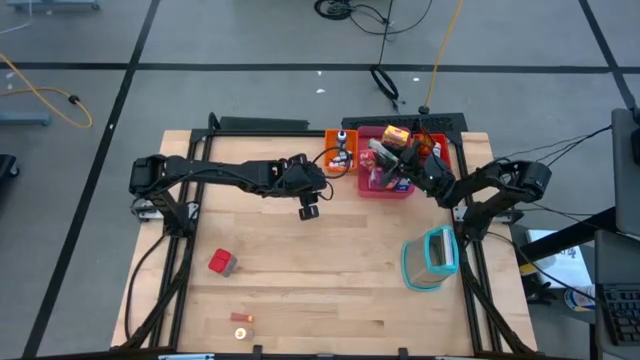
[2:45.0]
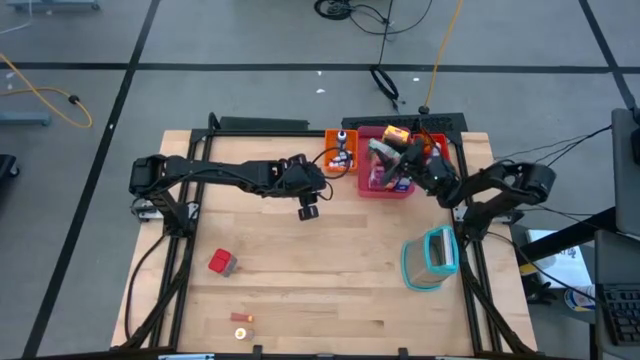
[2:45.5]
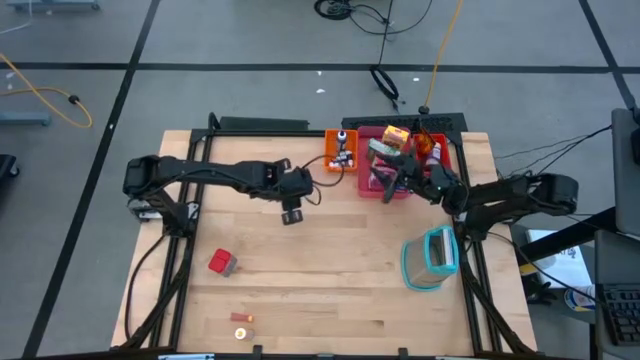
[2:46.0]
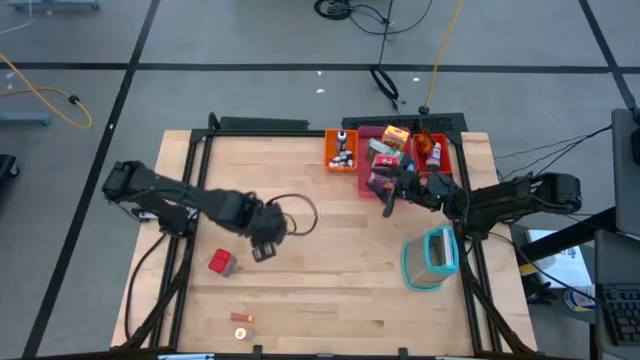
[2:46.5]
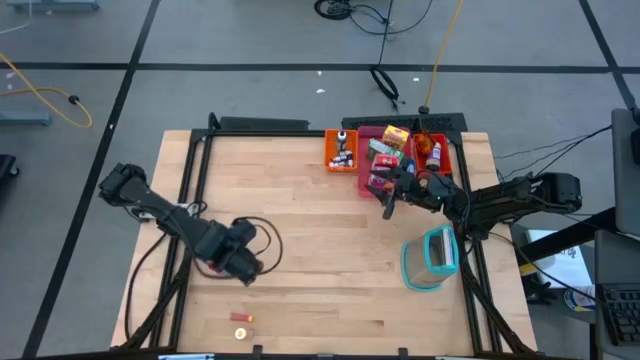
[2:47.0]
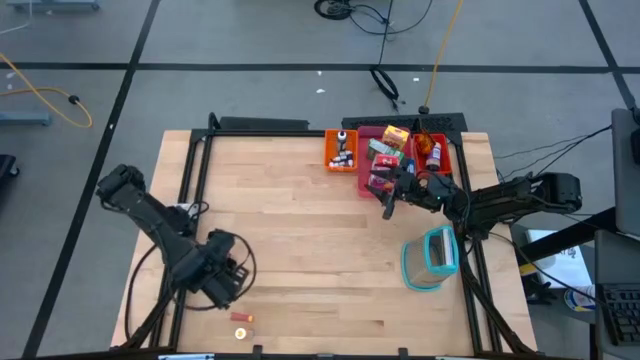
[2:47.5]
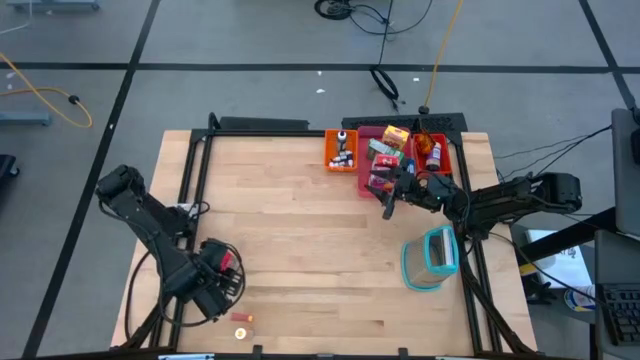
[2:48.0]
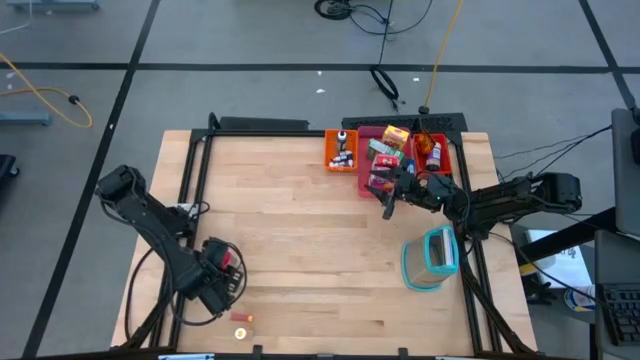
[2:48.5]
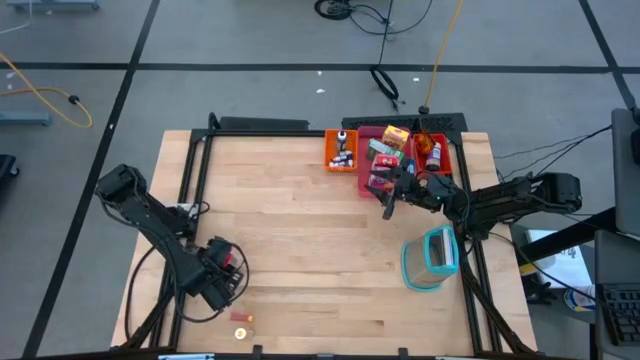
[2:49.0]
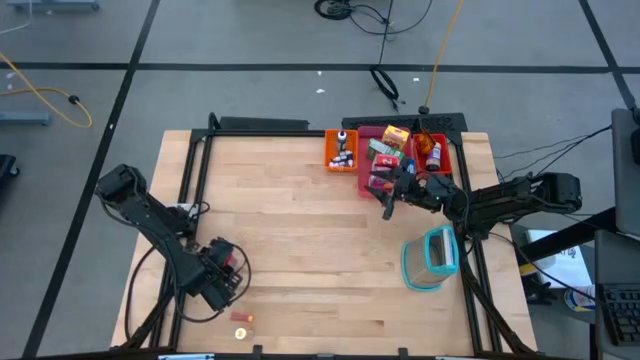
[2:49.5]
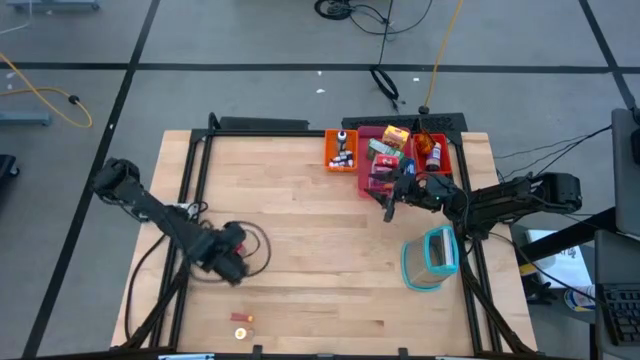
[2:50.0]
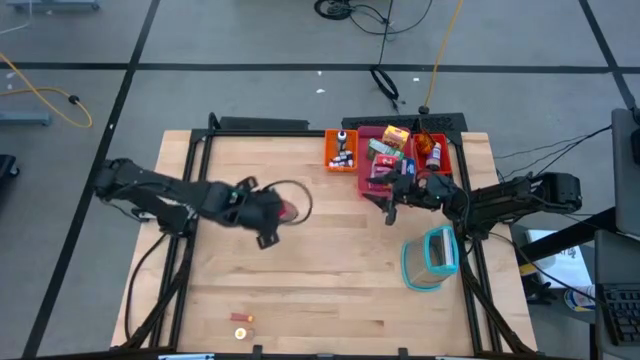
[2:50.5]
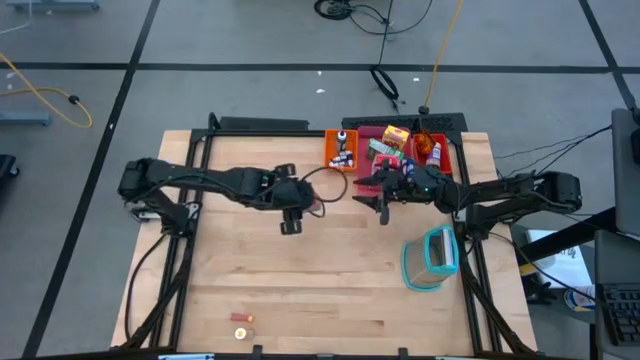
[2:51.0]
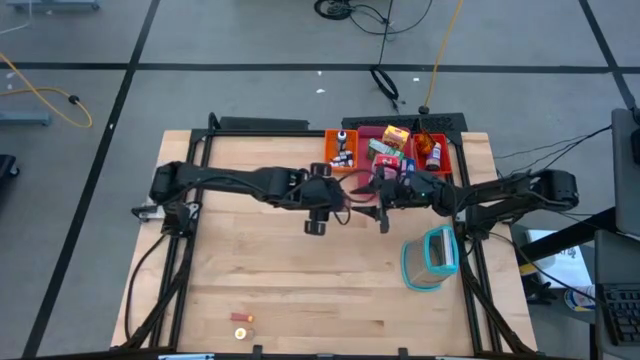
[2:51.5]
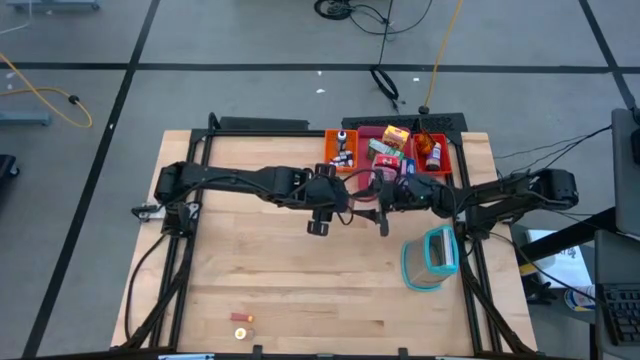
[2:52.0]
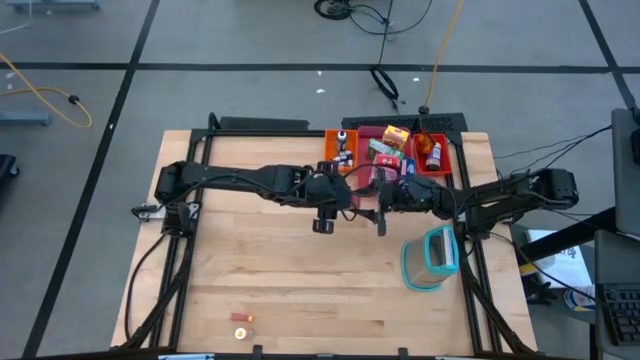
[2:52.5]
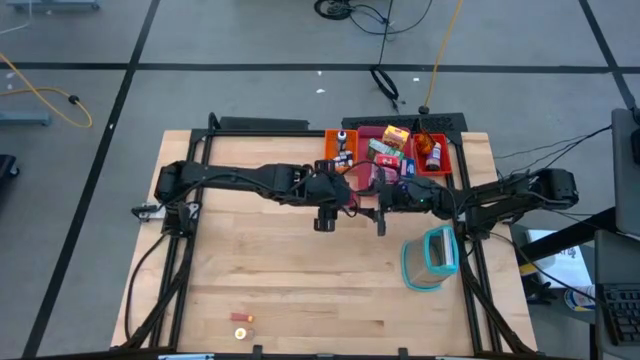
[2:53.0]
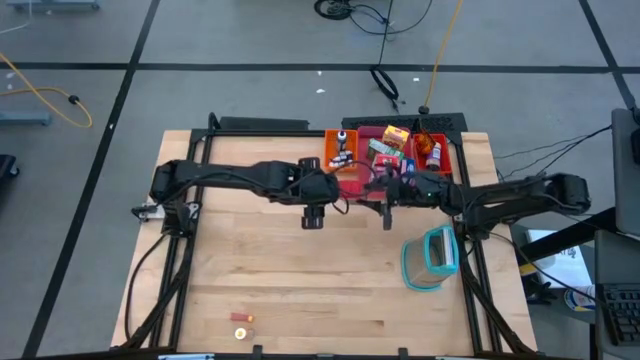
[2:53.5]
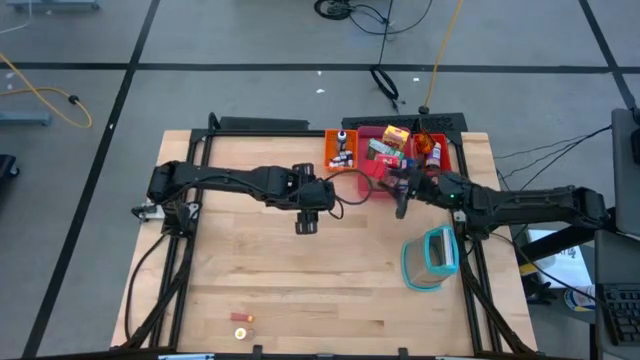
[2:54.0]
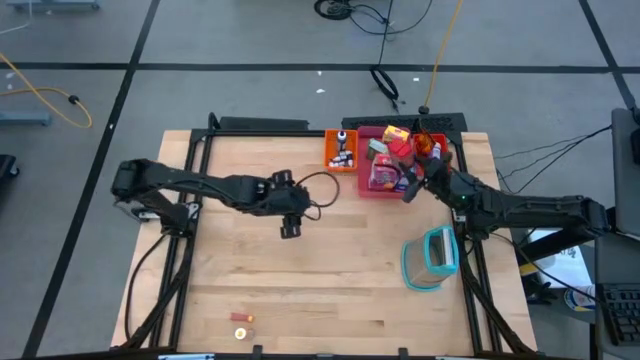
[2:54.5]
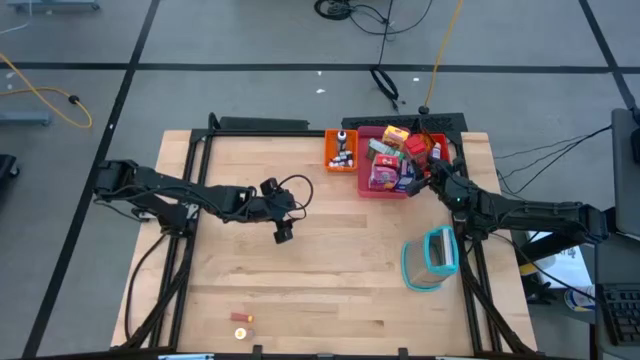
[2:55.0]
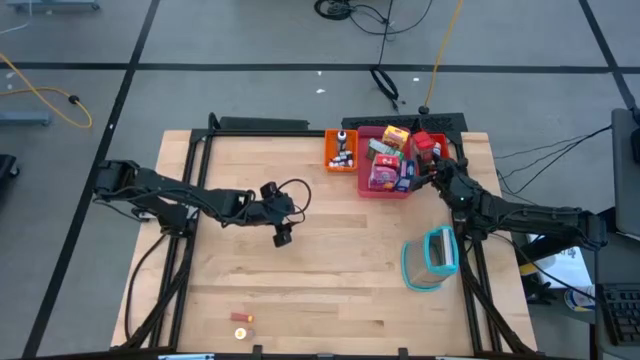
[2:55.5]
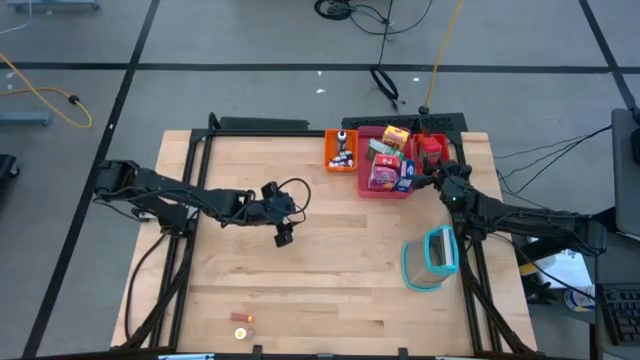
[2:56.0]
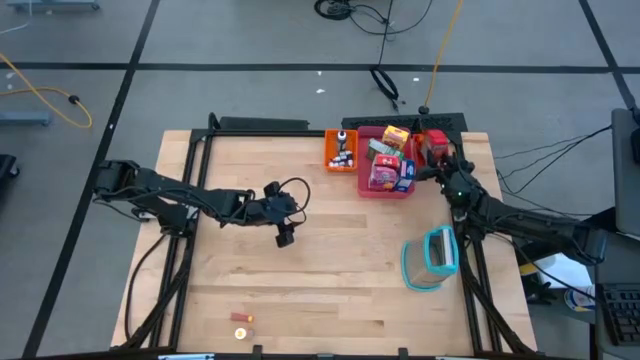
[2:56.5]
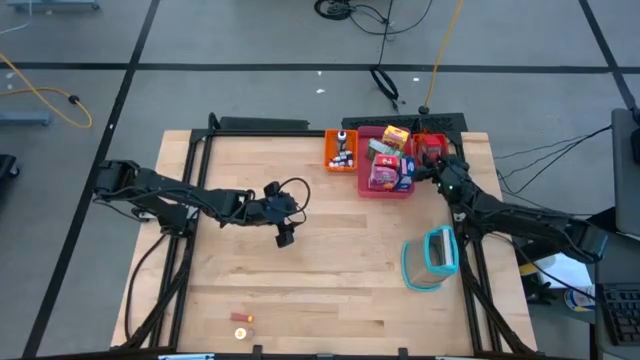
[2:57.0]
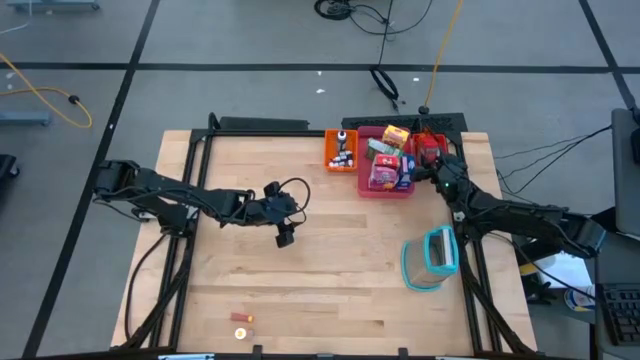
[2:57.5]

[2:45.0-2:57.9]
Task: Pick & Place Kitchen Items
Put the red seasoning can into the red bin

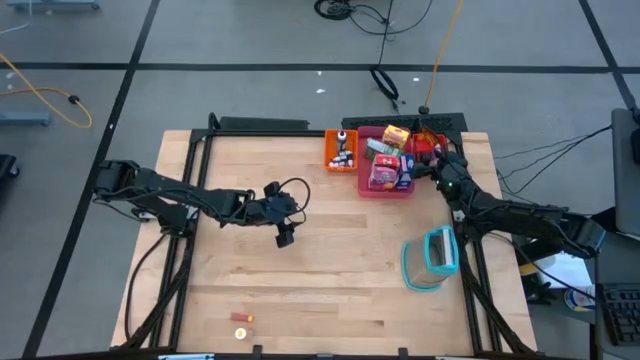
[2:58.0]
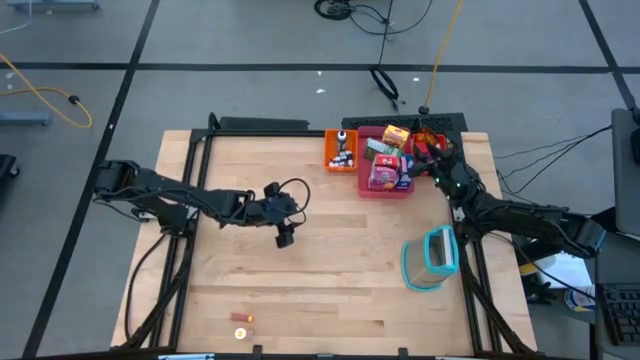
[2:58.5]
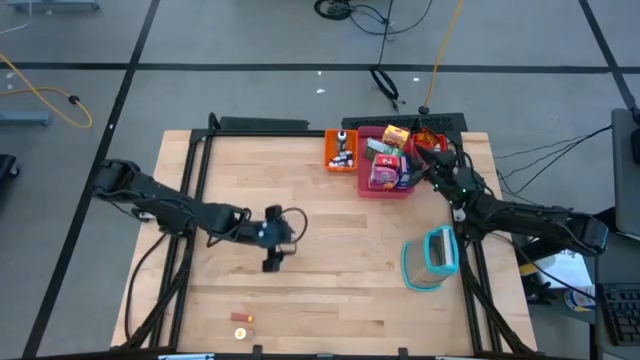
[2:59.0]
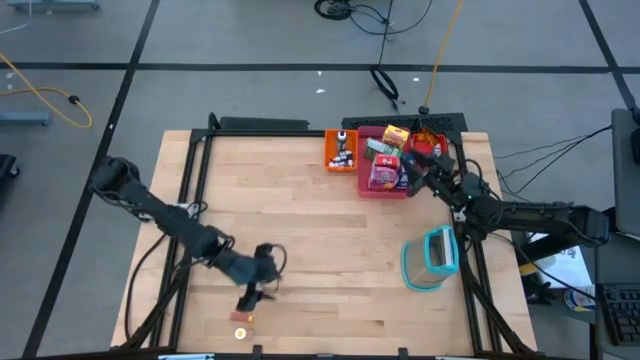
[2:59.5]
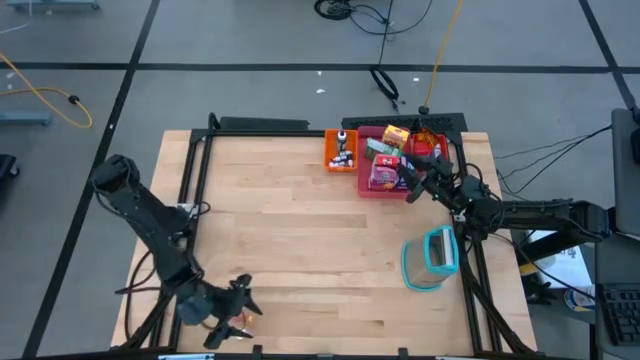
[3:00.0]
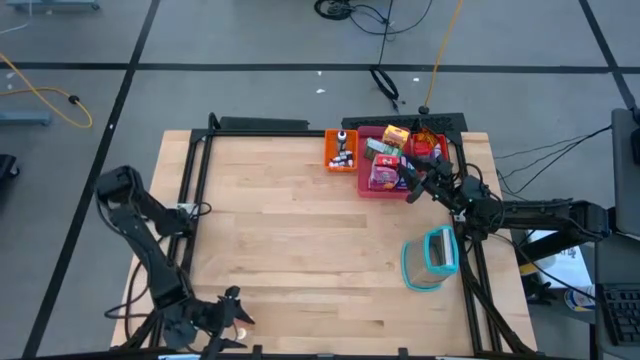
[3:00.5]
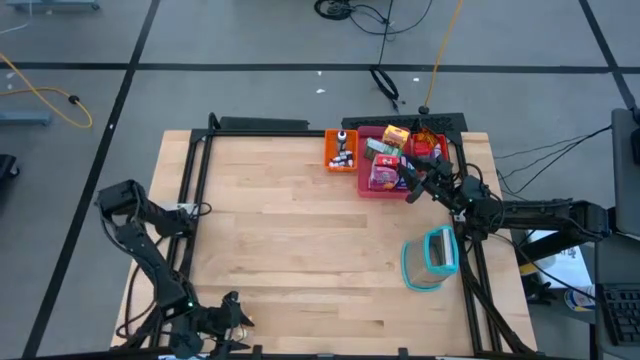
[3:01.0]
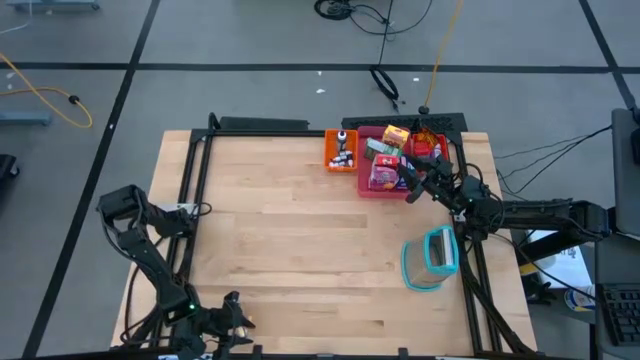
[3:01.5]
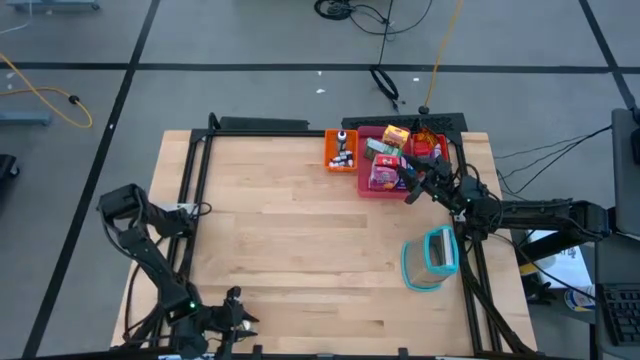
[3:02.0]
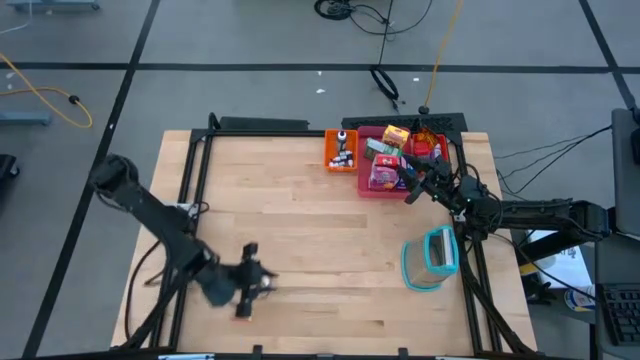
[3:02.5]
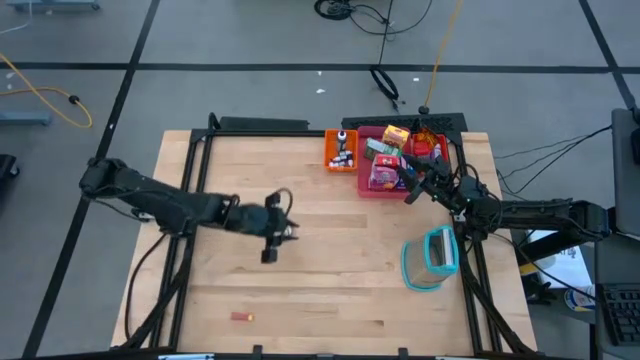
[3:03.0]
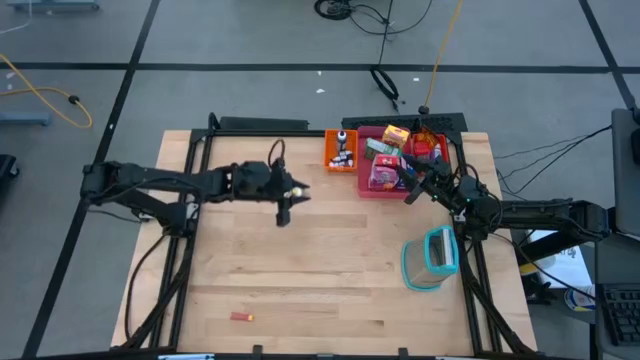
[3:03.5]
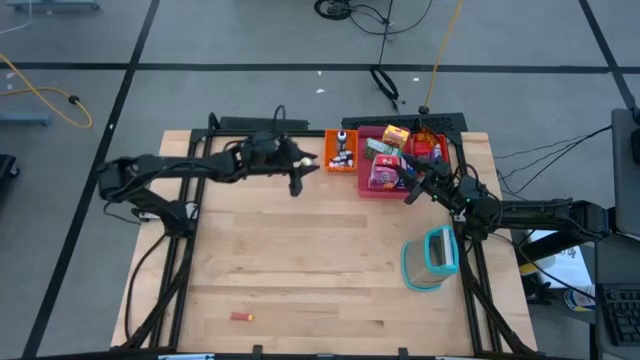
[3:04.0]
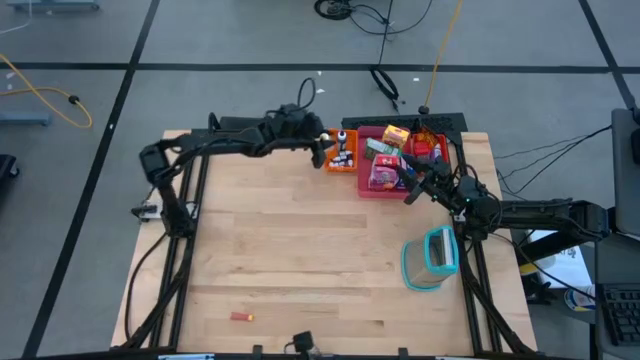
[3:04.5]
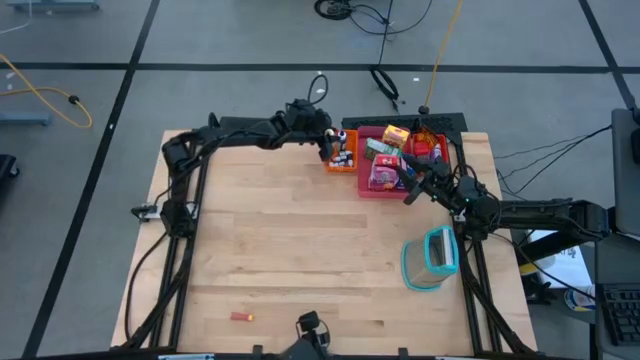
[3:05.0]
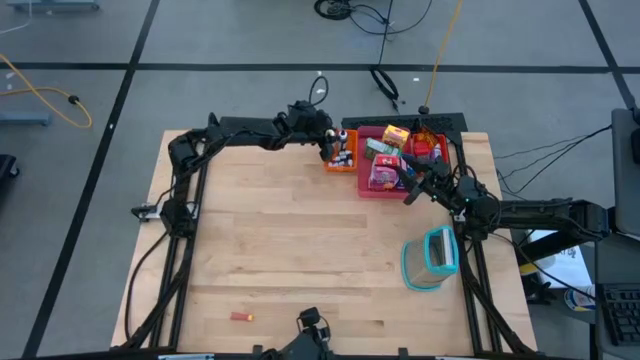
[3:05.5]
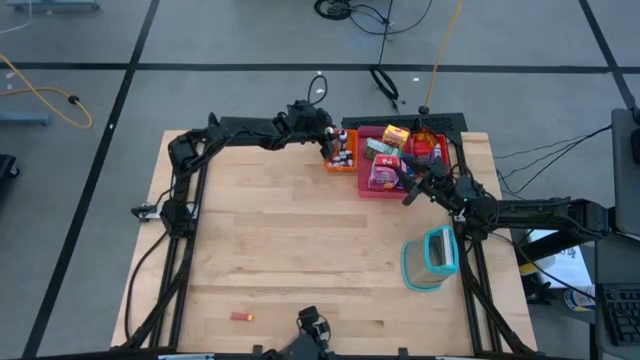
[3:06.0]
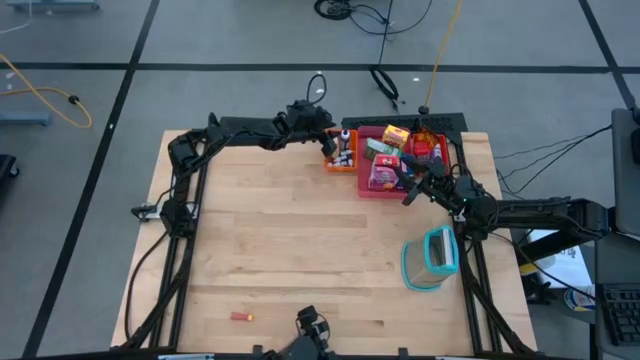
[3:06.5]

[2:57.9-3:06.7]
Put the large yellow food coloring bottle into the orange bin
